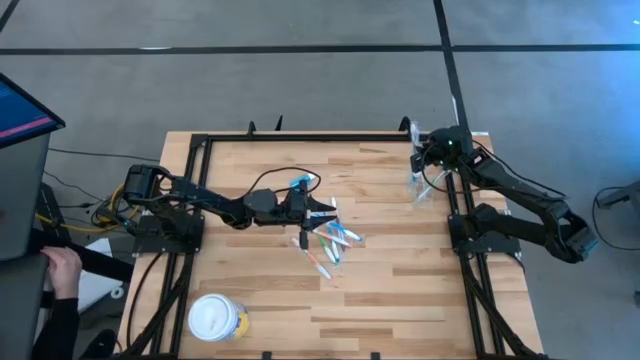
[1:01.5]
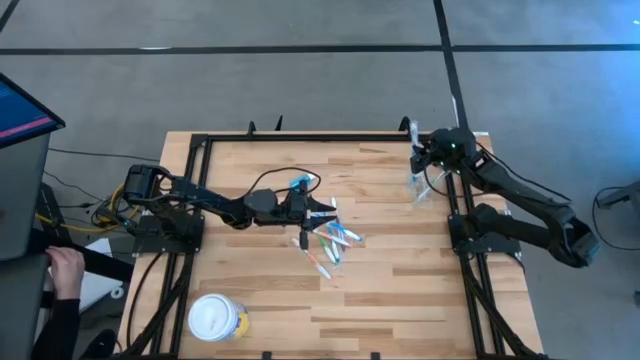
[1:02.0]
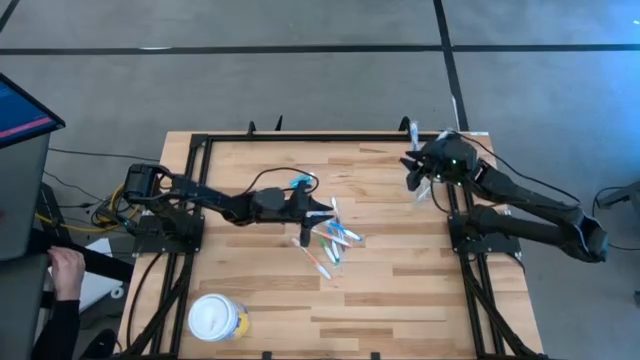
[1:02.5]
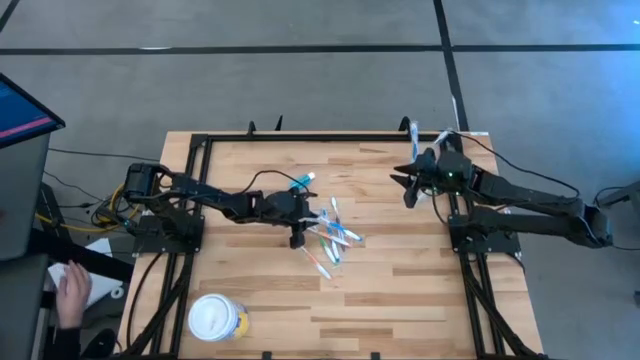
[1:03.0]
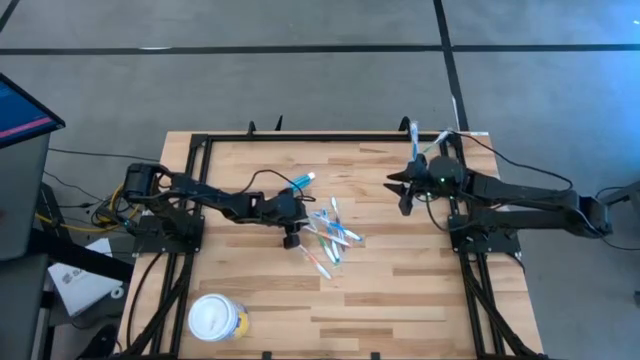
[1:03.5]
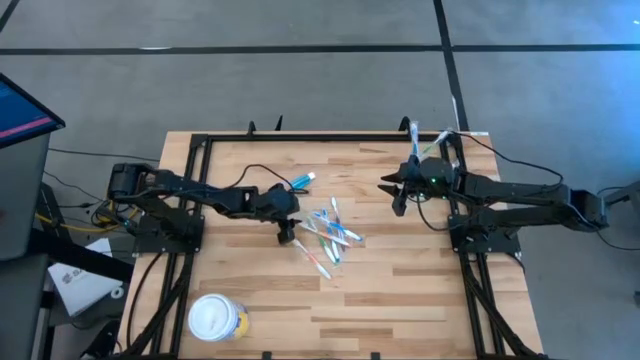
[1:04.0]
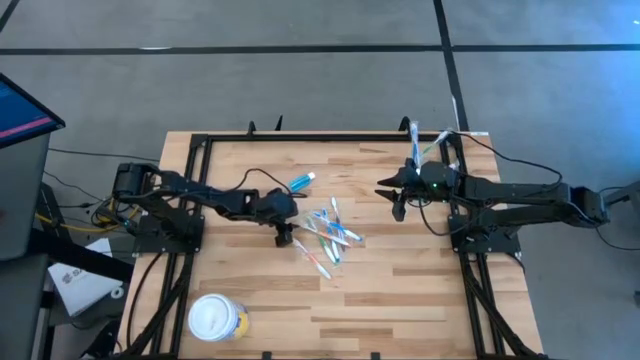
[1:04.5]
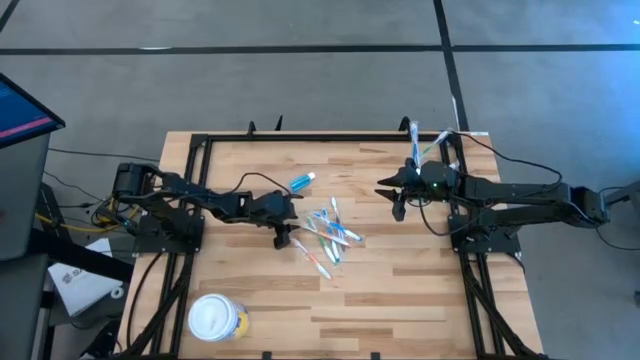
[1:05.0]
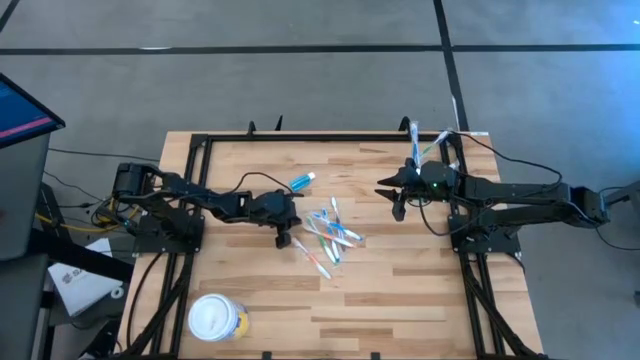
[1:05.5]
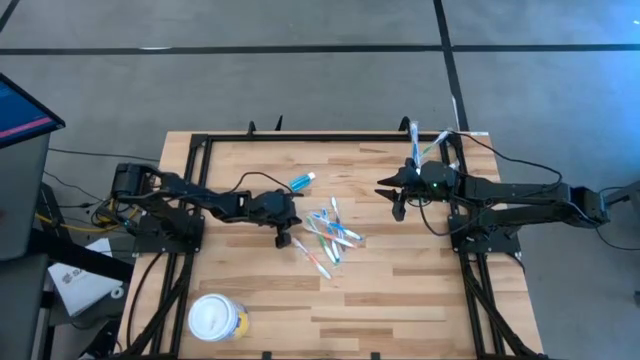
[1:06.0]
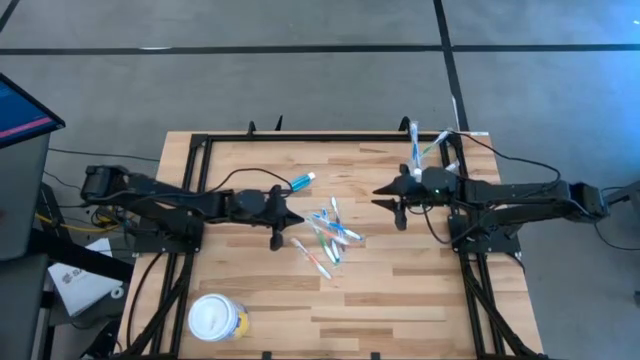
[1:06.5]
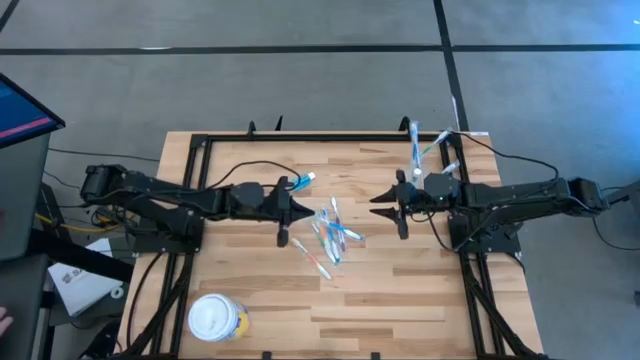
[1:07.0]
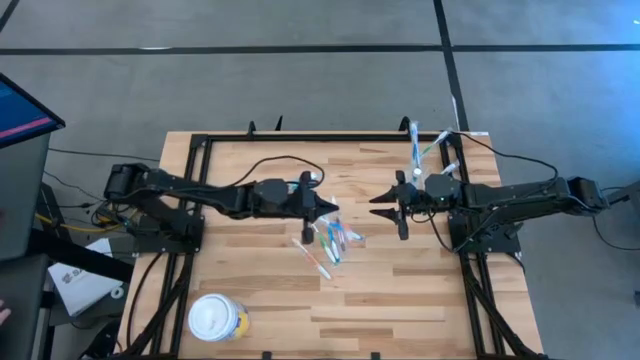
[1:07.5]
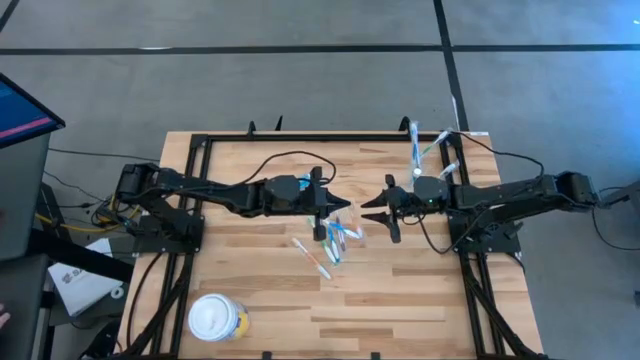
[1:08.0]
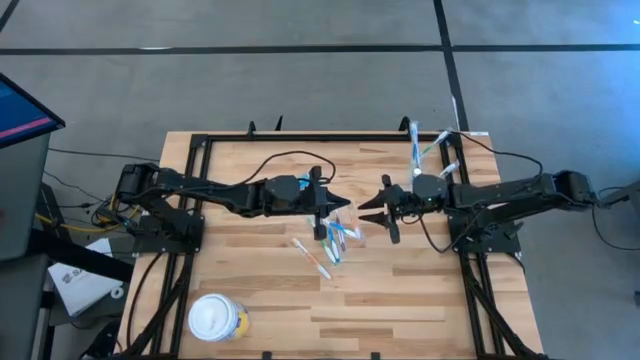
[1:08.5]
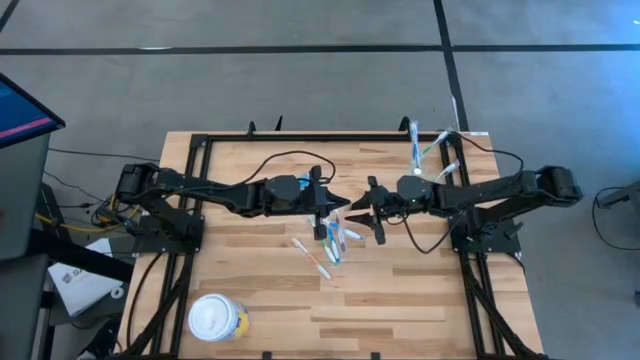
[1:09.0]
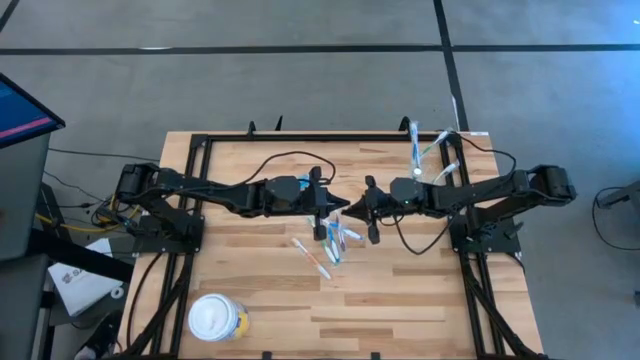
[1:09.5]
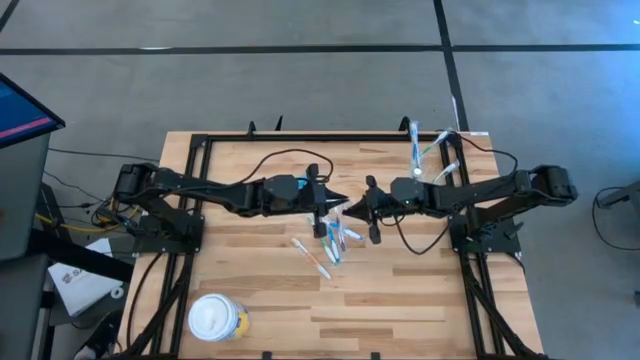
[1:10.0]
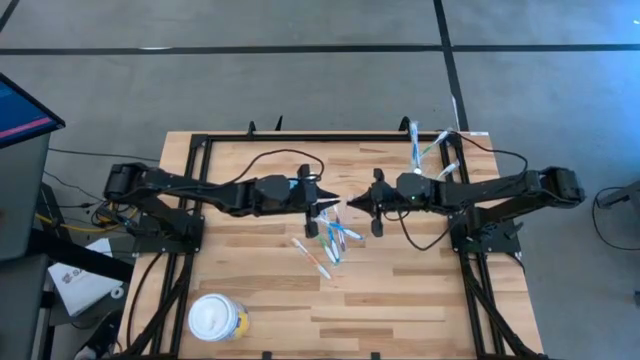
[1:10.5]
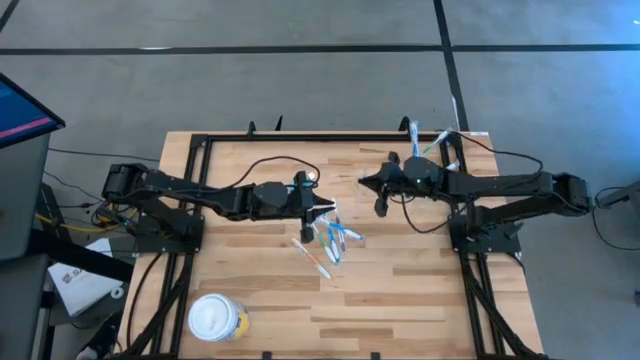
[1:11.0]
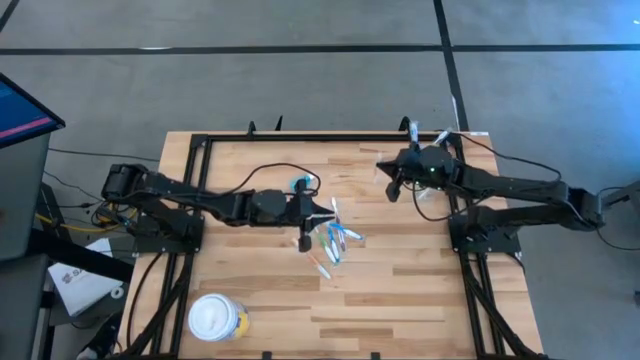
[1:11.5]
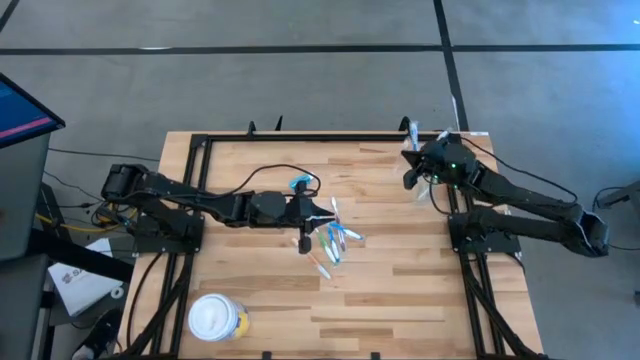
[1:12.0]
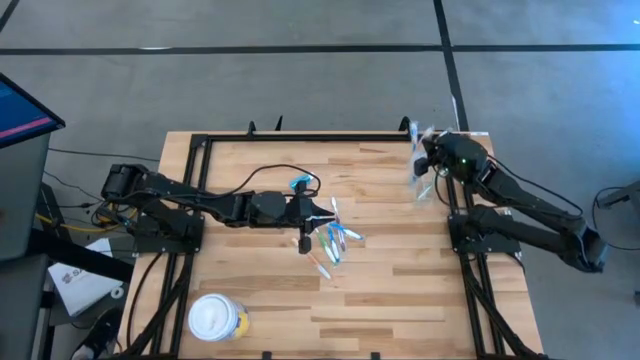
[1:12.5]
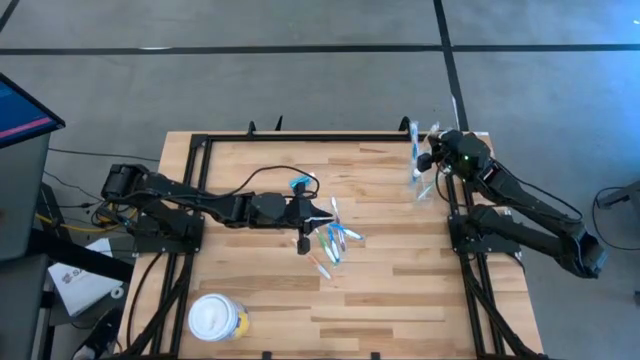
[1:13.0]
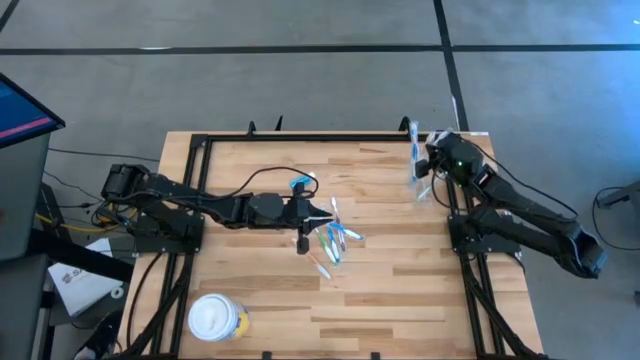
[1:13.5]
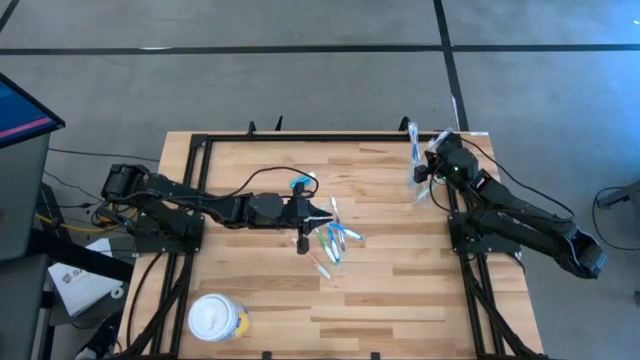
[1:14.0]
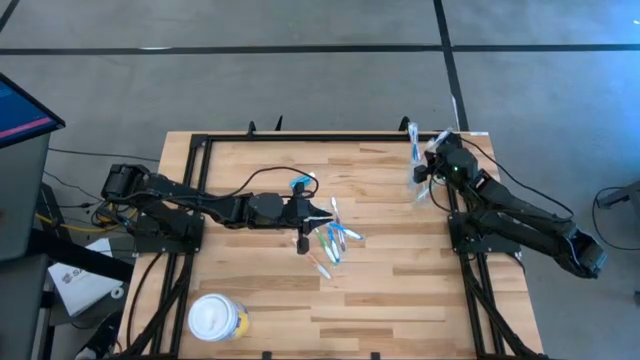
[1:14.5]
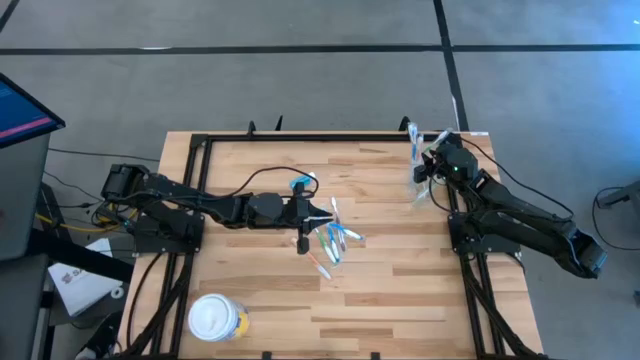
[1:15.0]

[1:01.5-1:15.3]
Task: Pick & Place toothbrushing station
Put the orange toothbrush into the transparent organizer

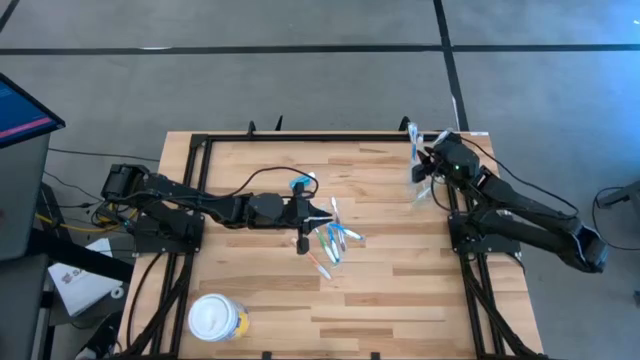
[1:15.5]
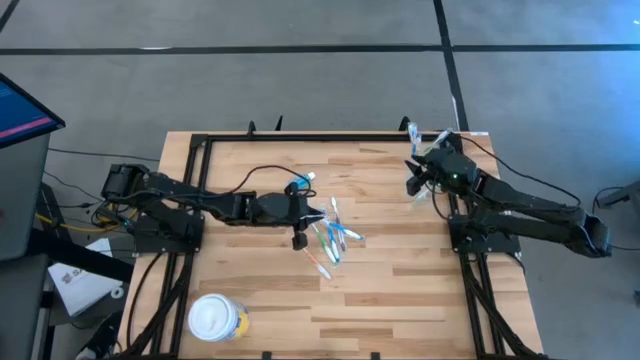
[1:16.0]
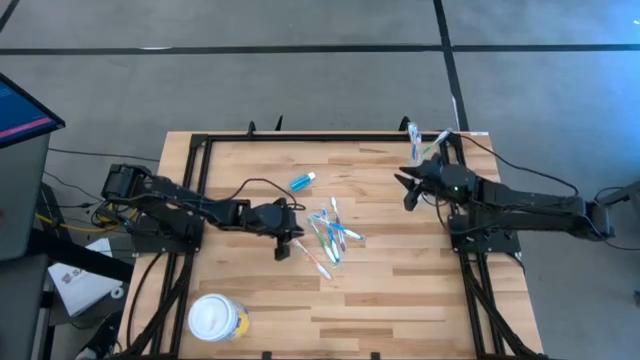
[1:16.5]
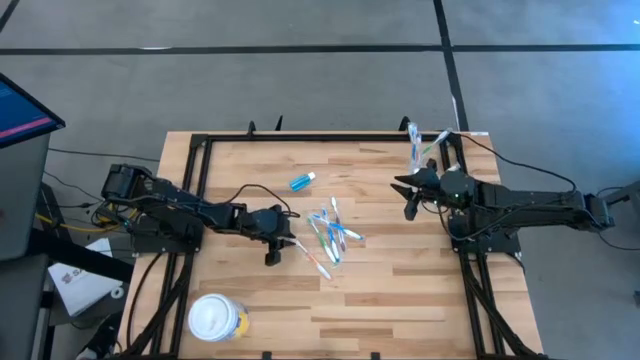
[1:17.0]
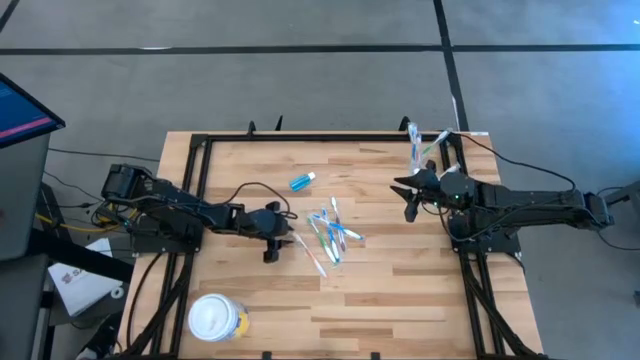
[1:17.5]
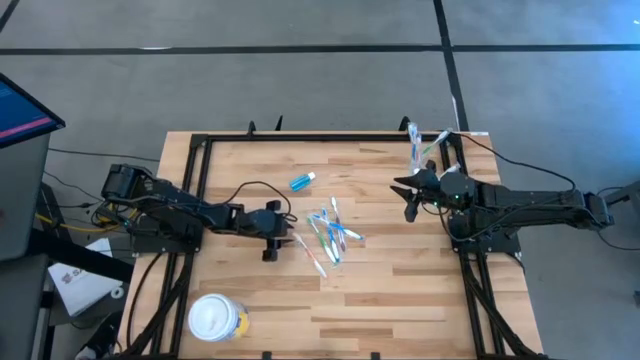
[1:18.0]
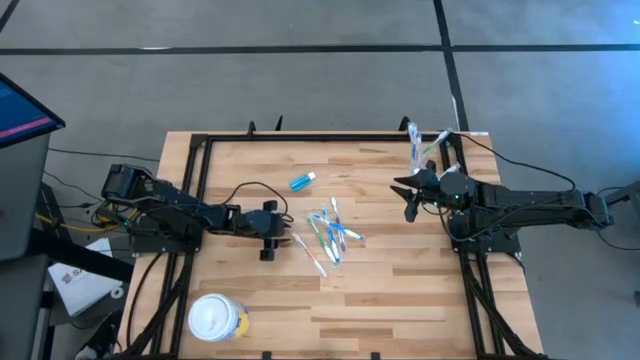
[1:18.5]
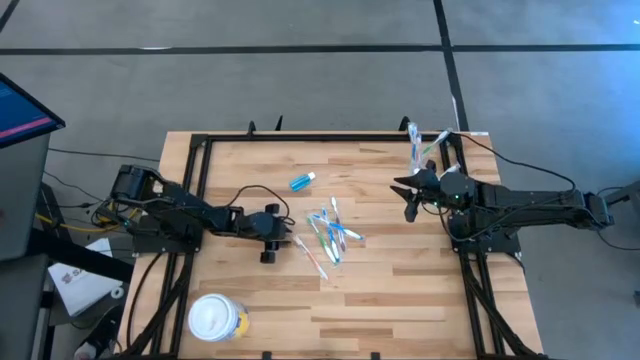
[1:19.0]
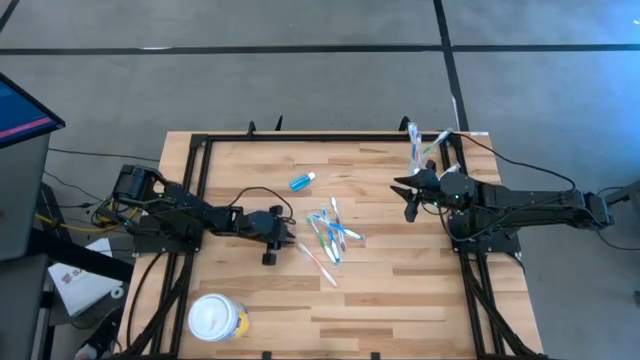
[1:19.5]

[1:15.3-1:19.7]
Put the orange toothbrush into the transparent organizer

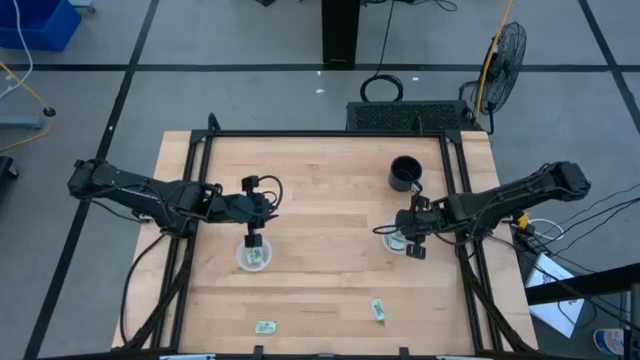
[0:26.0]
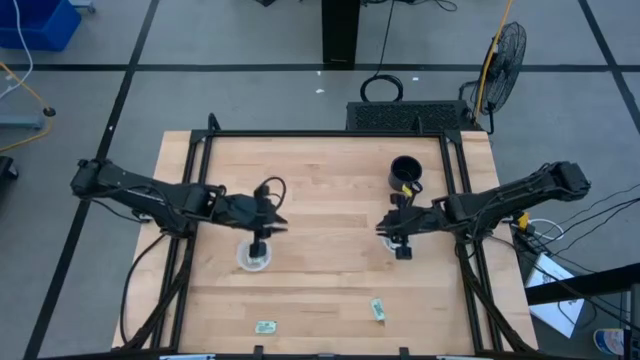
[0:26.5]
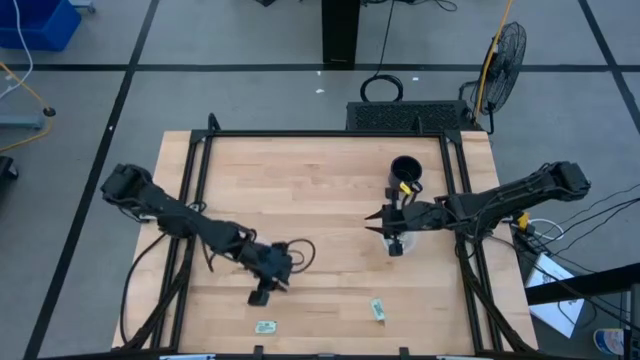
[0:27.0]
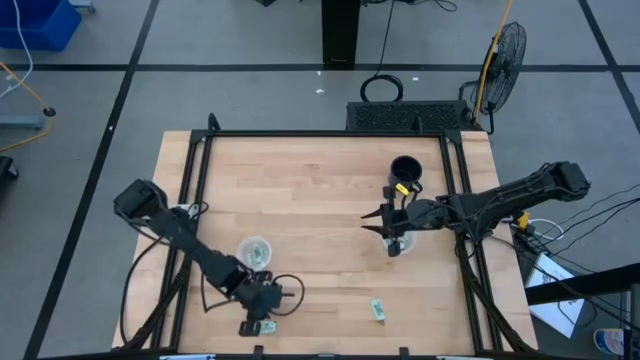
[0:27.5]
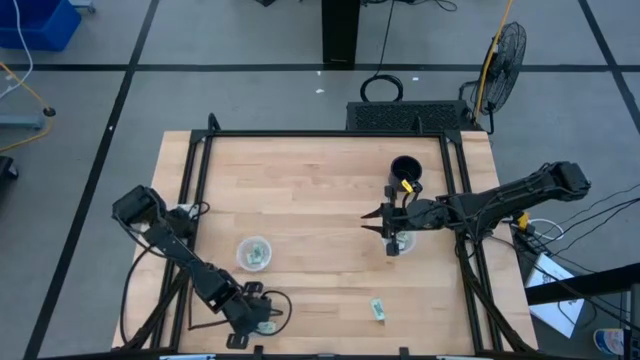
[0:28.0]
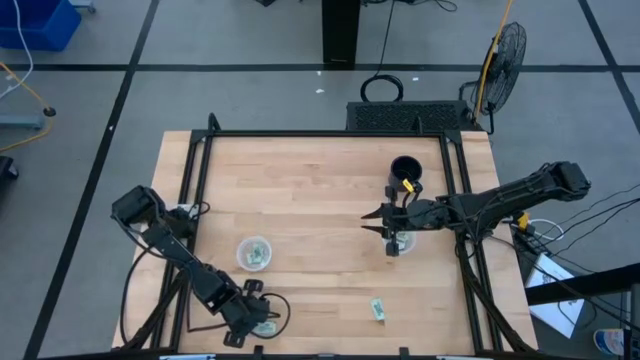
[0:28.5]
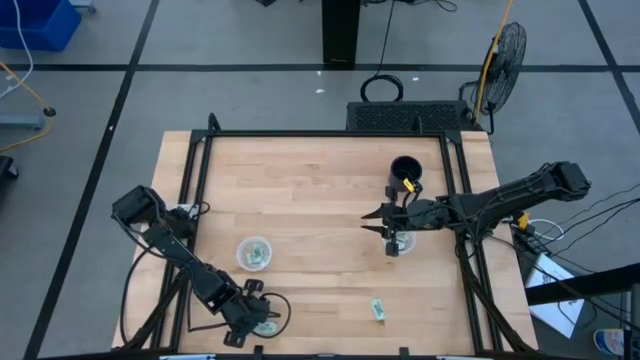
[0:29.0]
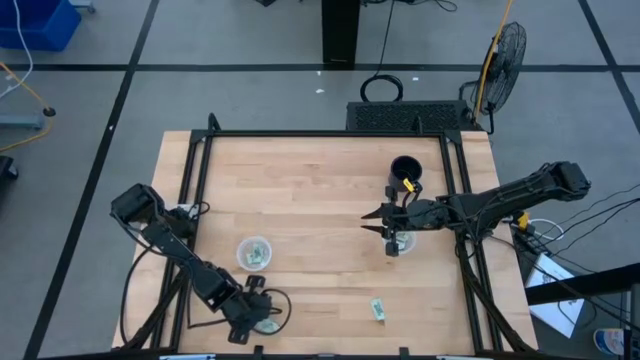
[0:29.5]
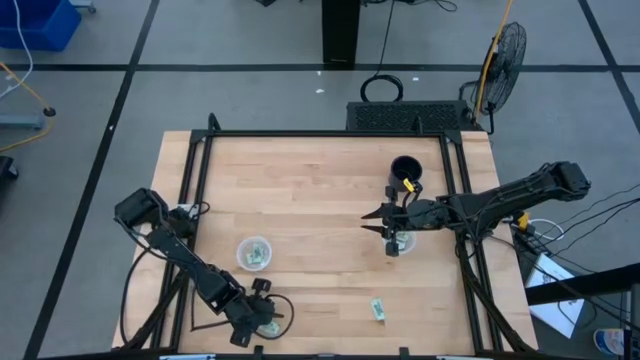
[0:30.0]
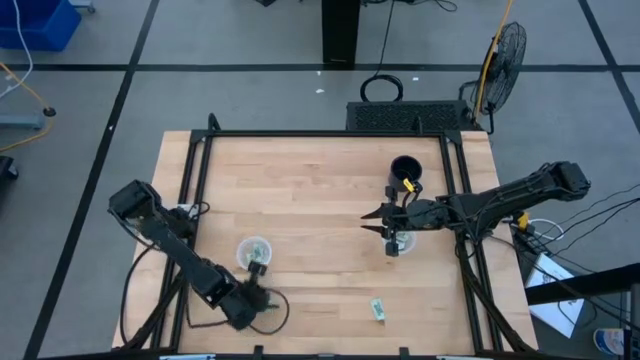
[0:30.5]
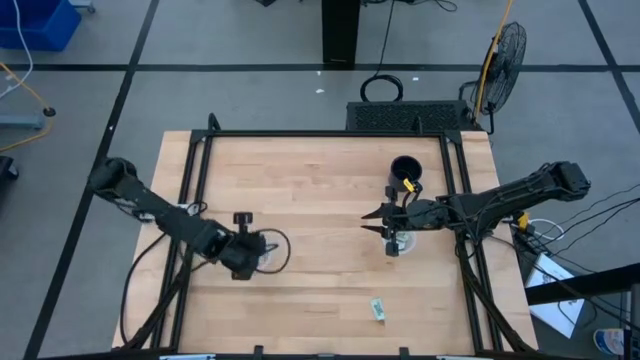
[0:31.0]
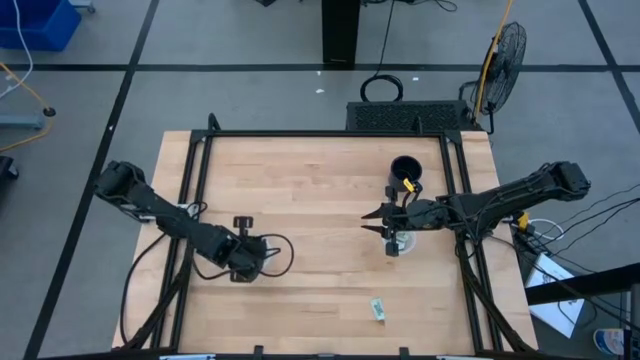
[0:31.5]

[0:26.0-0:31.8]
Task: Pick and place items into bin
Put the white stevia packet into the left transparent bin
